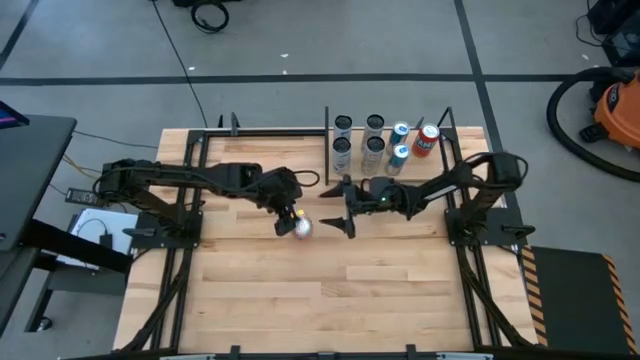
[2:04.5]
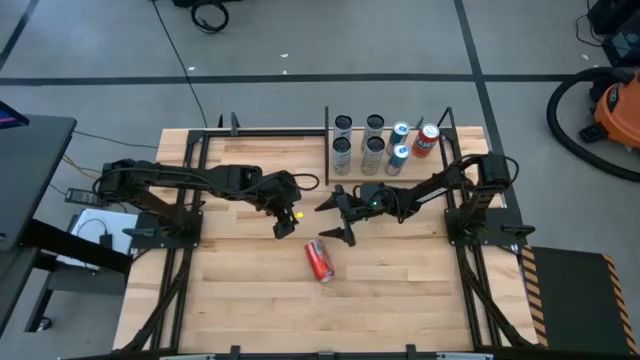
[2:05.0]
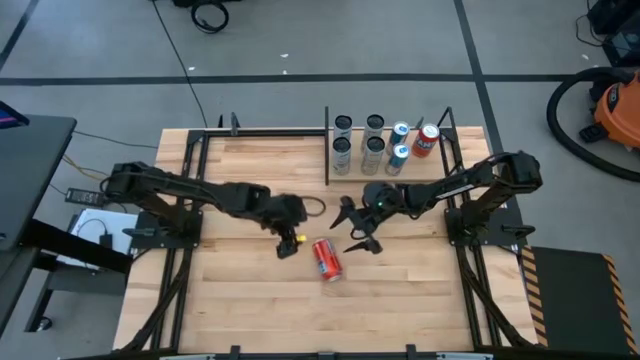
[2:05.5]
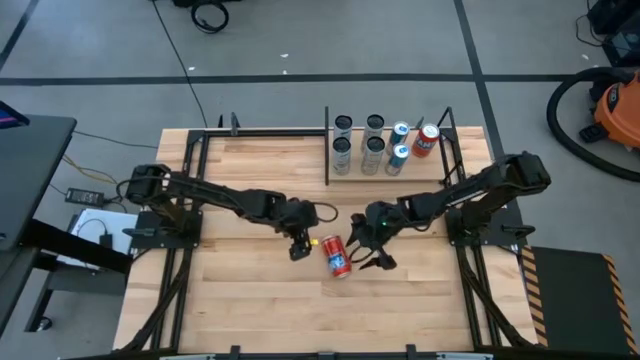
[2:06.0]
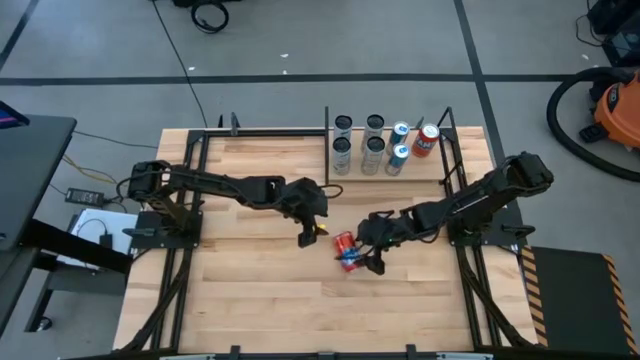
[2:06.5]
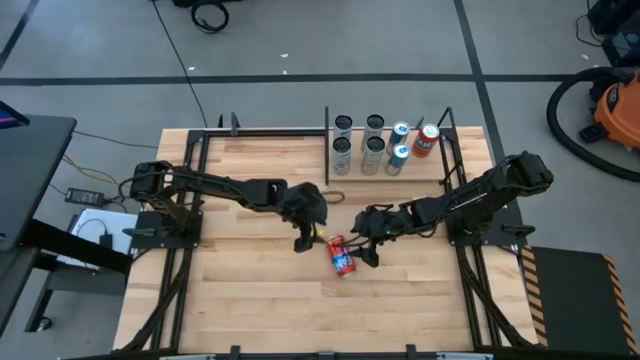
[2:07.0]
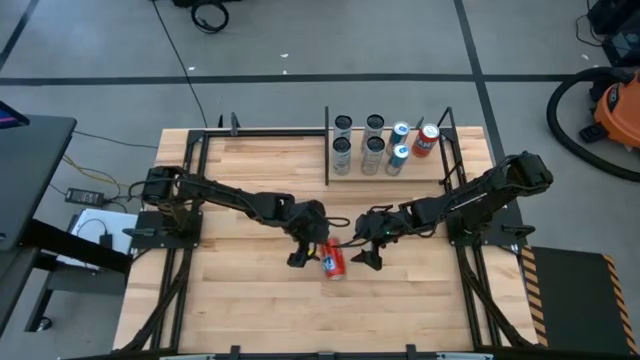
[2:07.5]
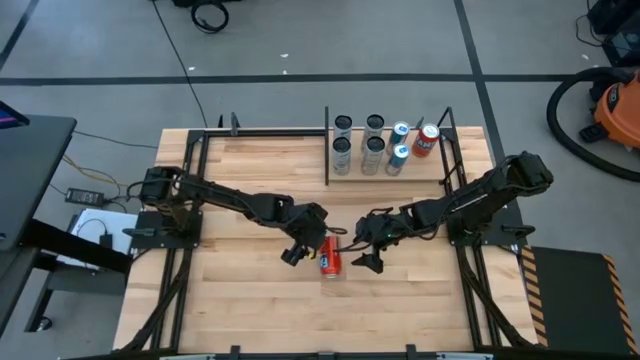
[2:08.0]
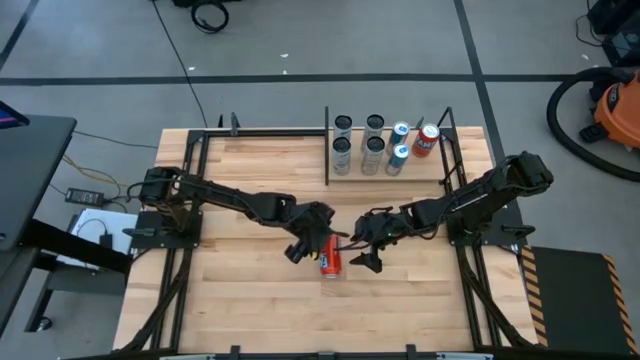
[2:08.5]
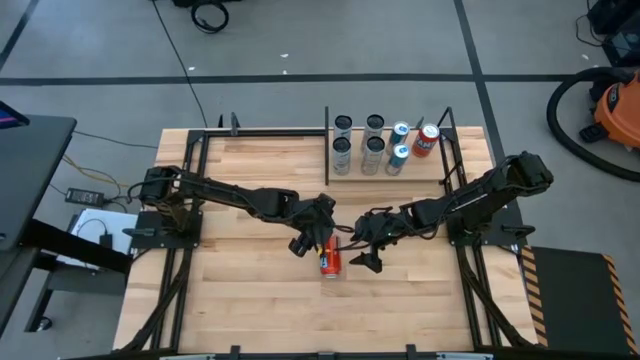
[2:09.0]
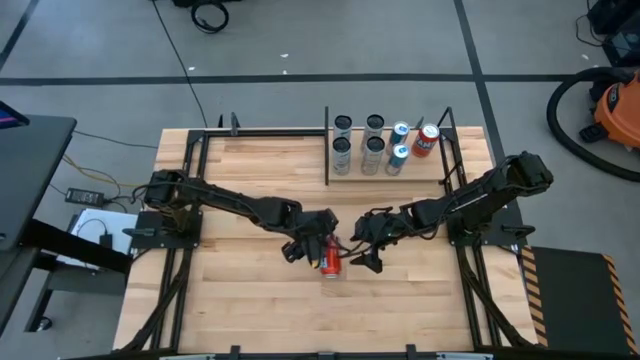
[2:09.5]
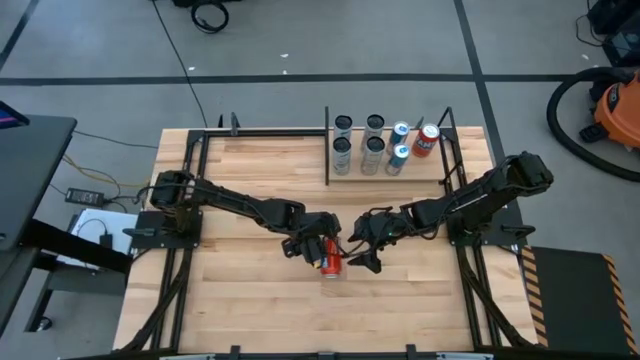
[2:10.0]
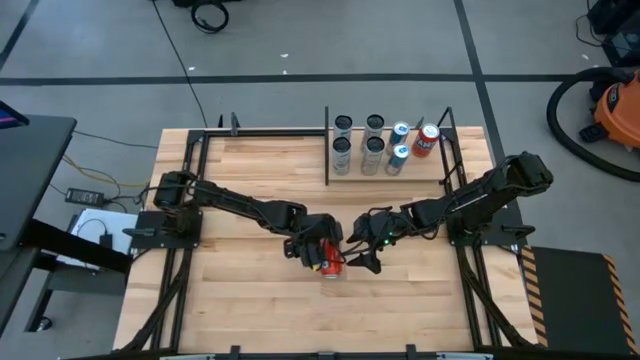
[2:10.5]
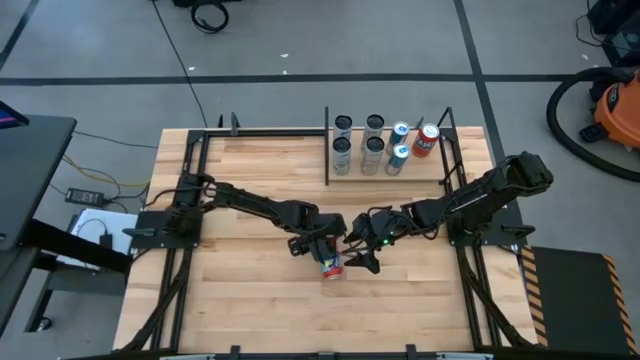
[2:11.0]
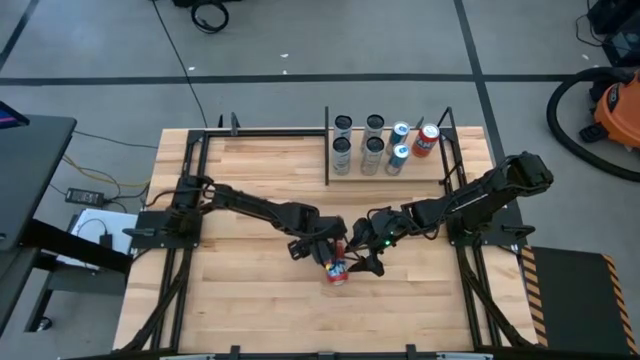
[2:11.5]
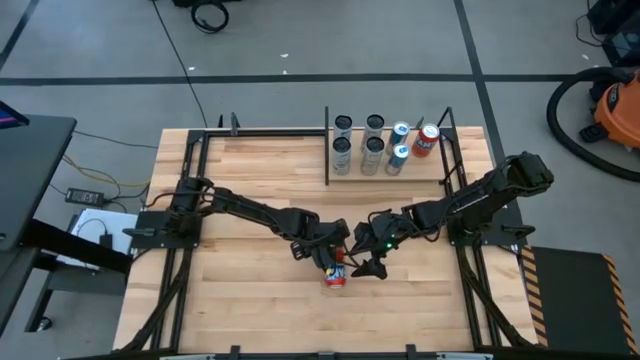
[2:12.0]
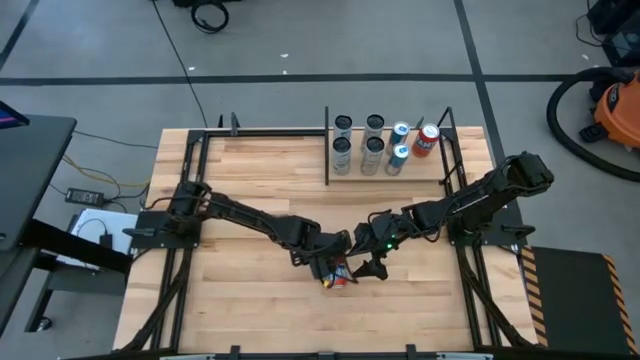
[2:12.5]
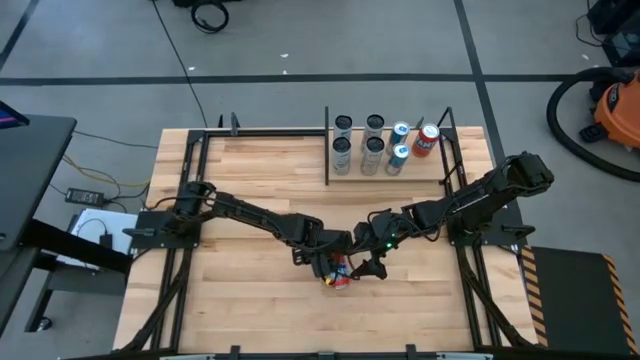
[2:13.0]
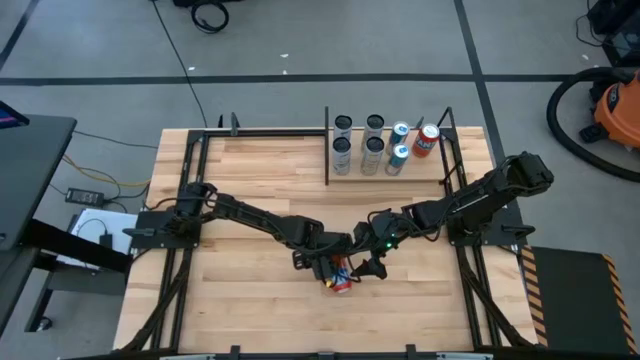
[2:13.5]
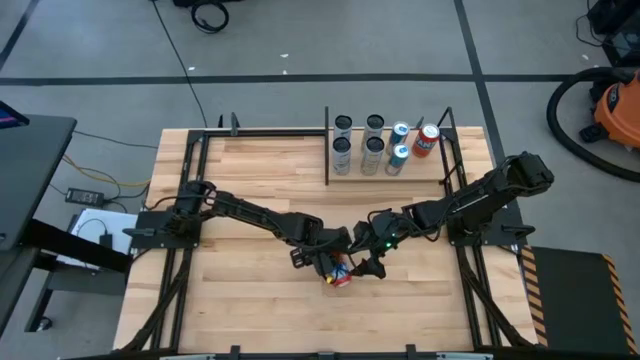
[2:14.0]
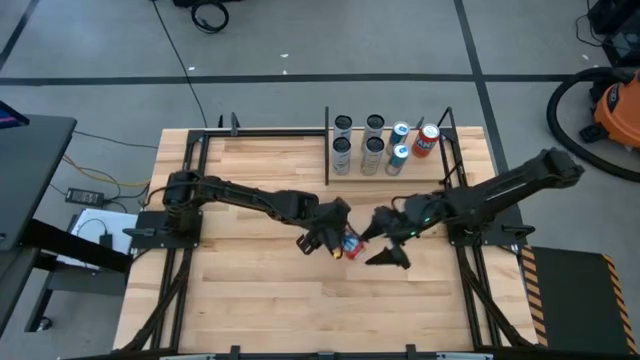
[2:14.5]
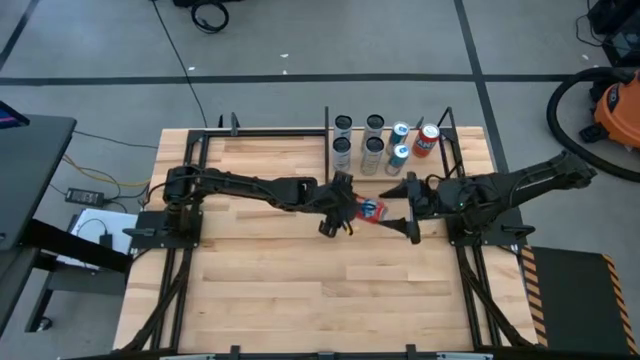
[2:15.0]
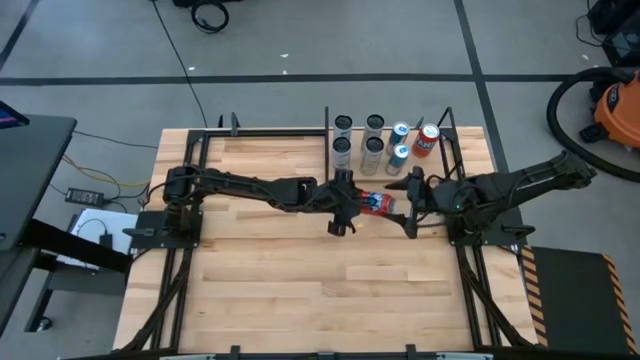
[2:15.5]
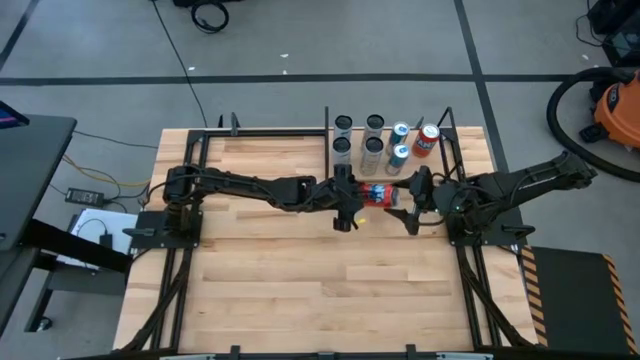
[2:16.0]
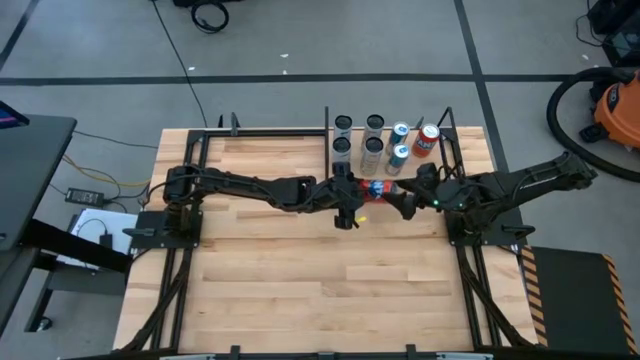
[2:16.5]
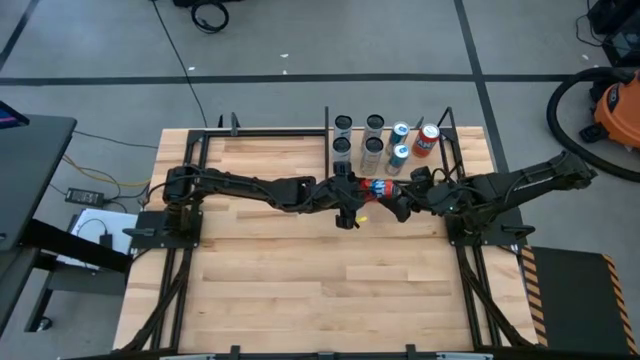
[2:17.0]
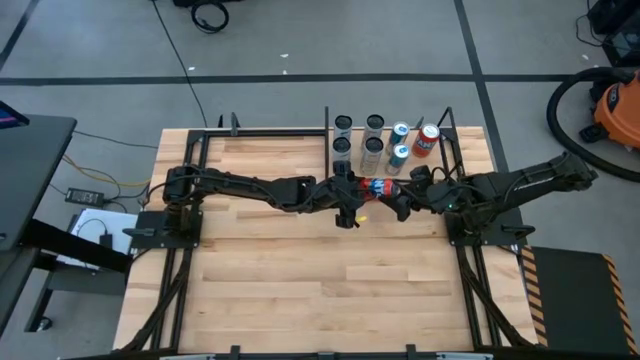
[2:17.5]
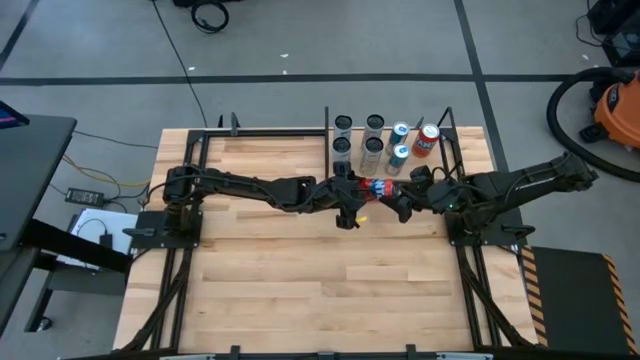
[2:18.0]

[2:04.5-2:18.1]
Task: Place canned beverage on shelf
Put the red soda can on the shelf aligned with the other orange soda can

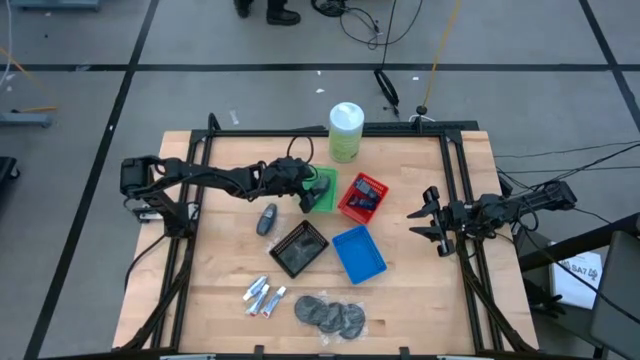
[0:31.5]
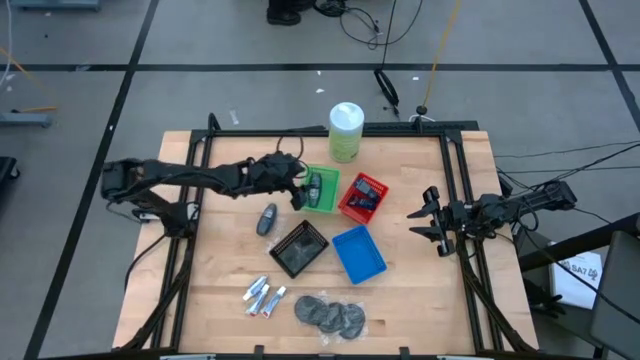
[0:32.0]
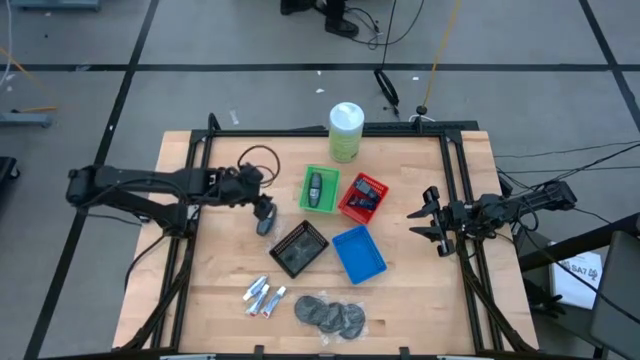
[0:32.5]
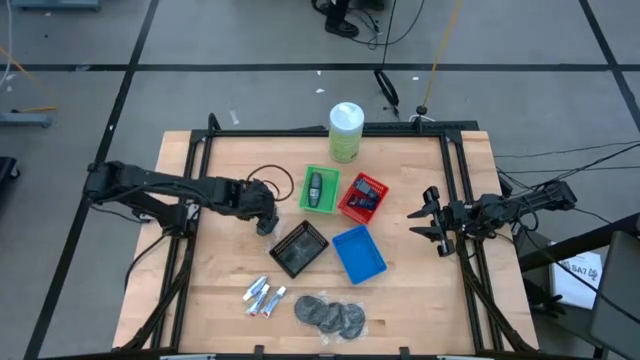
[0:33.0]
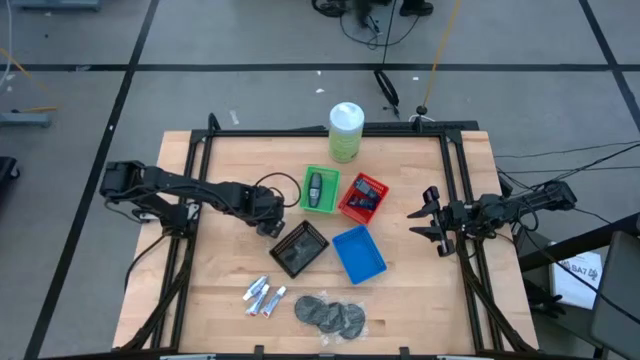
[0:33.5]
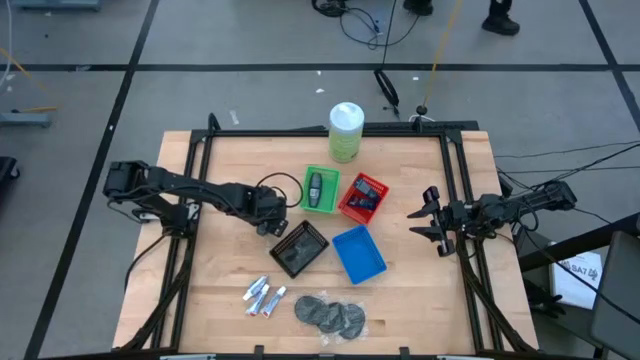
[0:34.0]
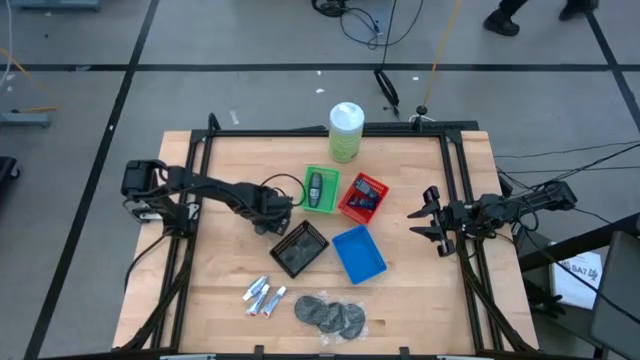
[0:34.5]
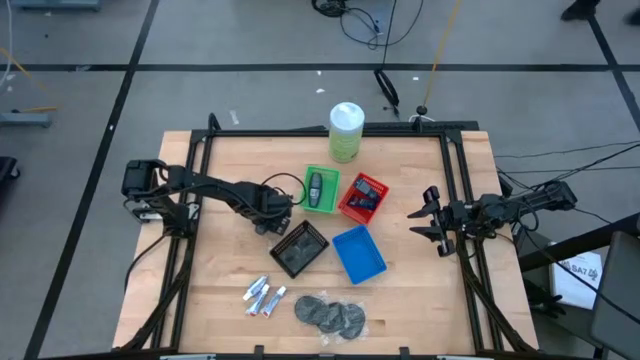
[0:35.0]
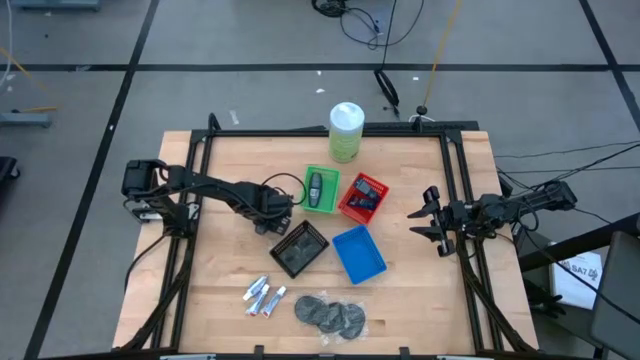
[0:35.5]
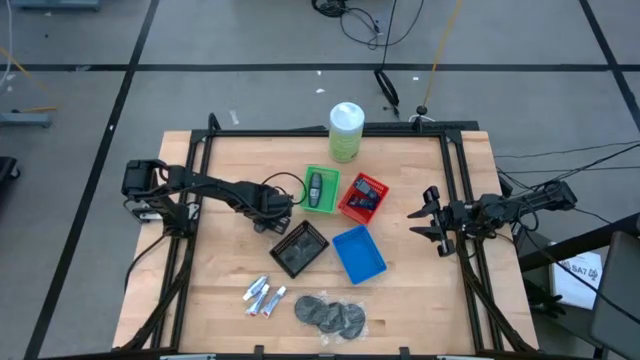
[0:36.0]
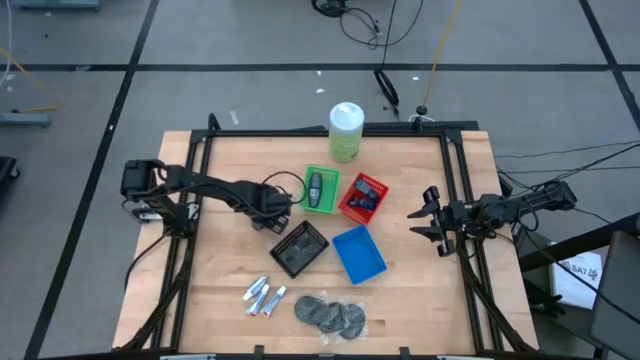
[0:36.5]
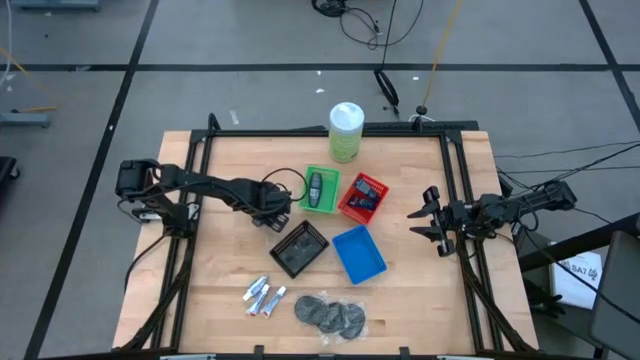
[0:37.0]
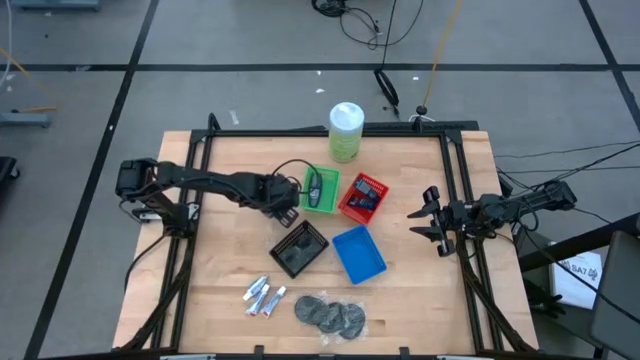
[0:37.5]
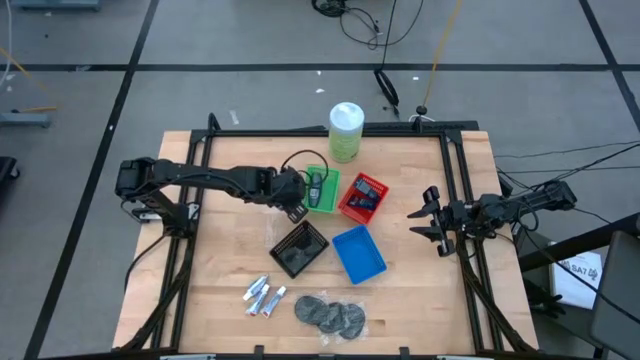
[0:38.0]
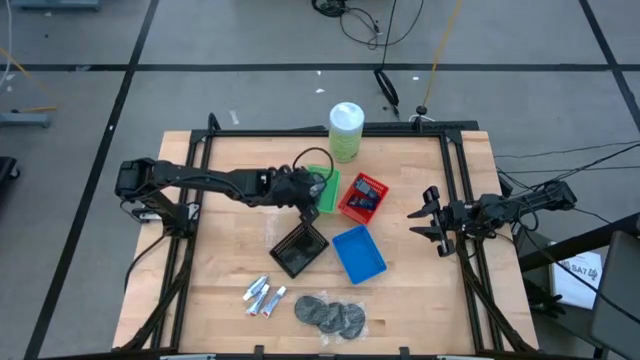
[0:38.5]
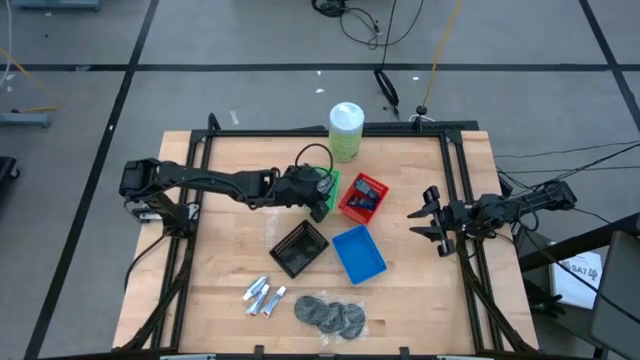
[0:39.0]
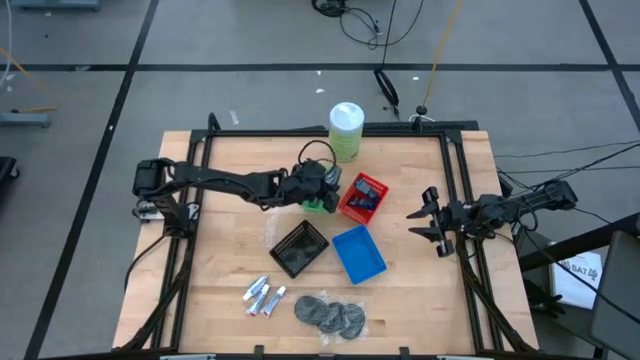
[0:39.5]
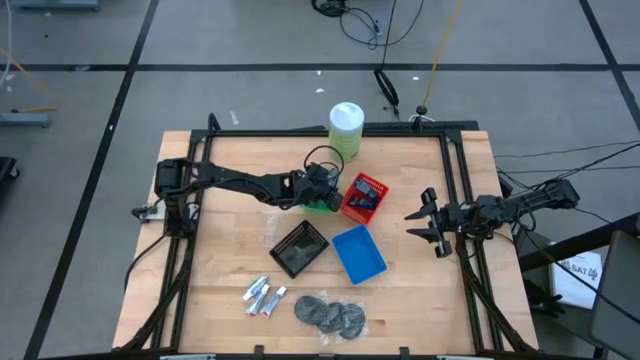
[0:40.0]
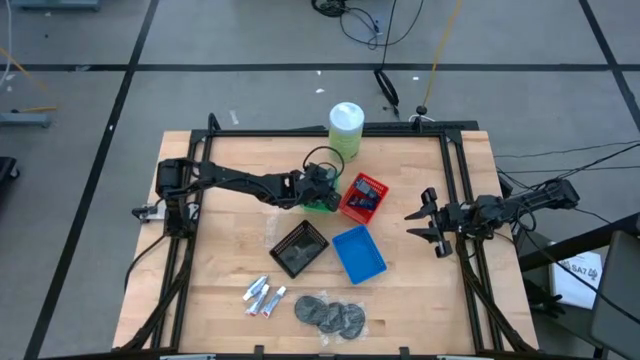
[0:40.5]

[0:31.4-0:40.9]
Task: Pick & Place Travel size toiletries
Put the black deodorant into the green bin
